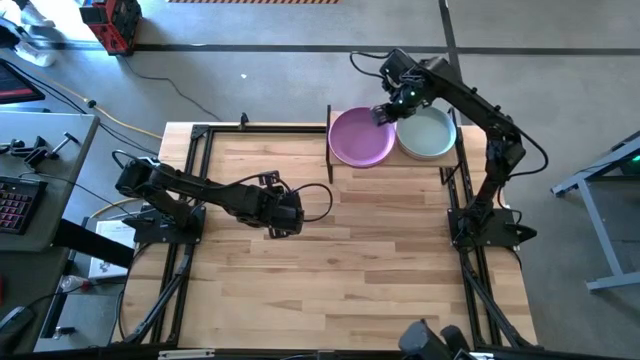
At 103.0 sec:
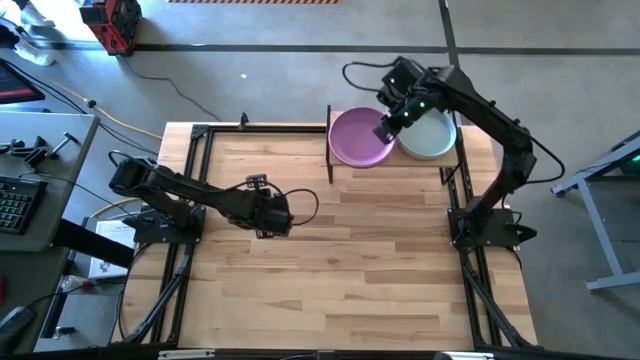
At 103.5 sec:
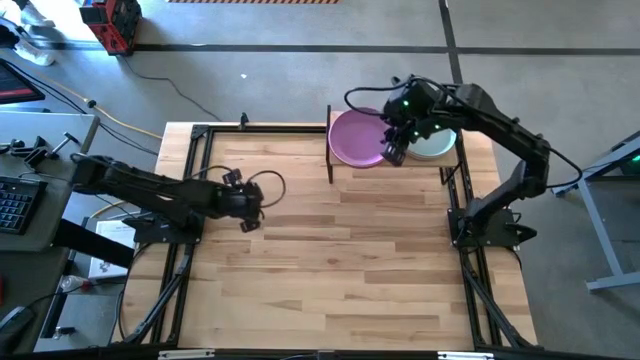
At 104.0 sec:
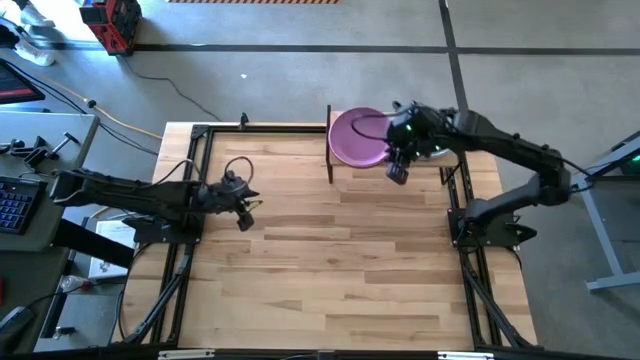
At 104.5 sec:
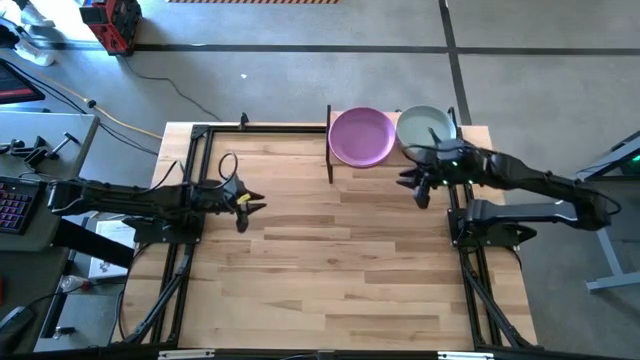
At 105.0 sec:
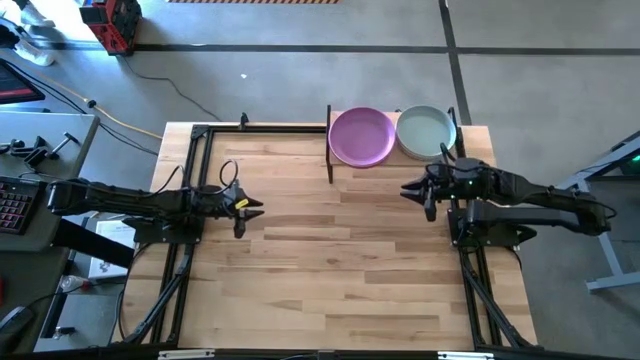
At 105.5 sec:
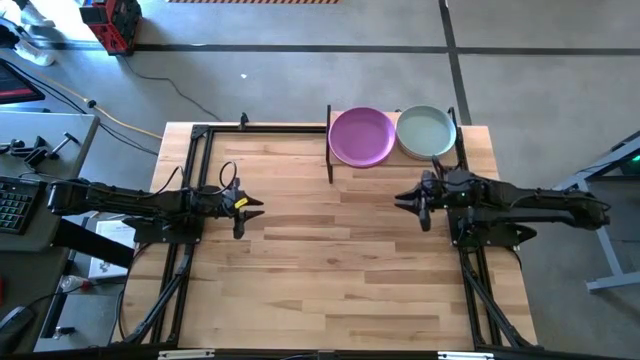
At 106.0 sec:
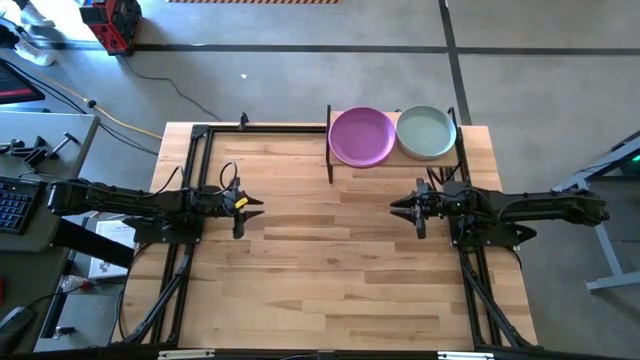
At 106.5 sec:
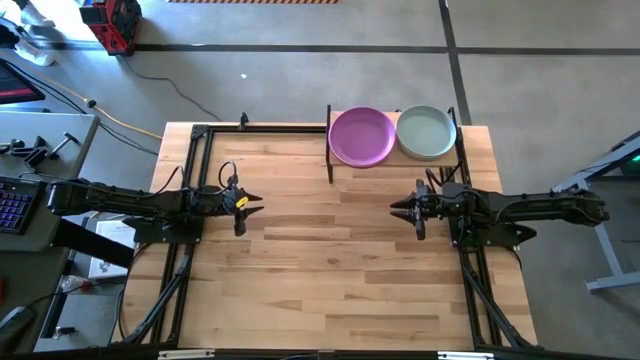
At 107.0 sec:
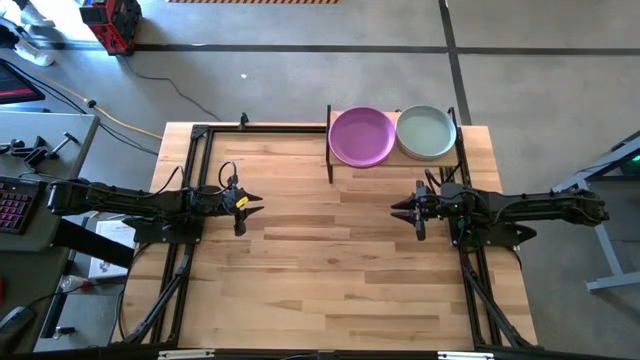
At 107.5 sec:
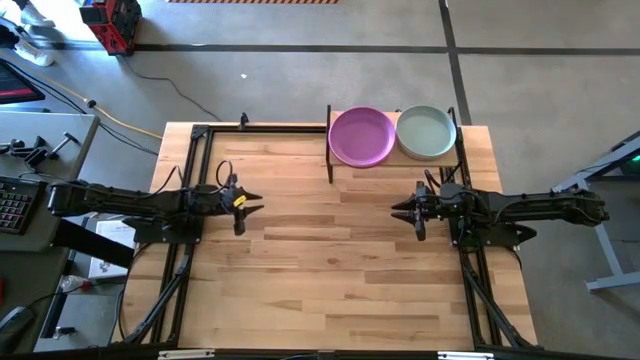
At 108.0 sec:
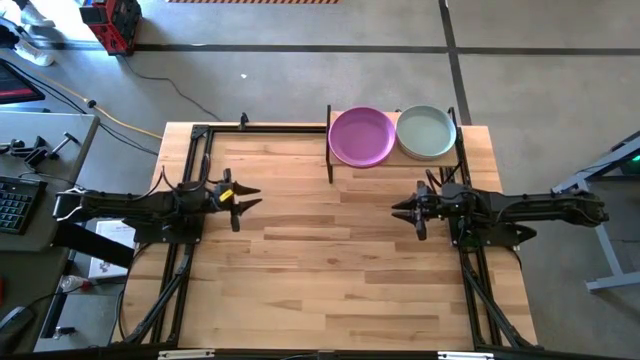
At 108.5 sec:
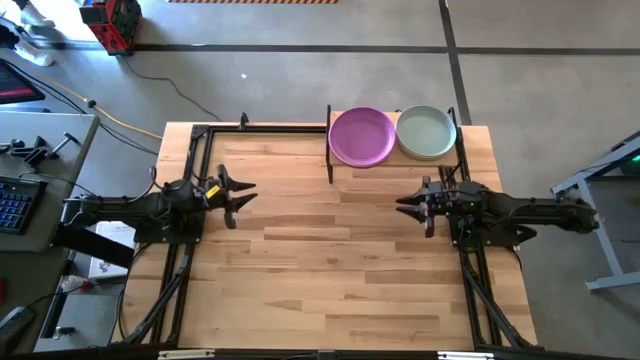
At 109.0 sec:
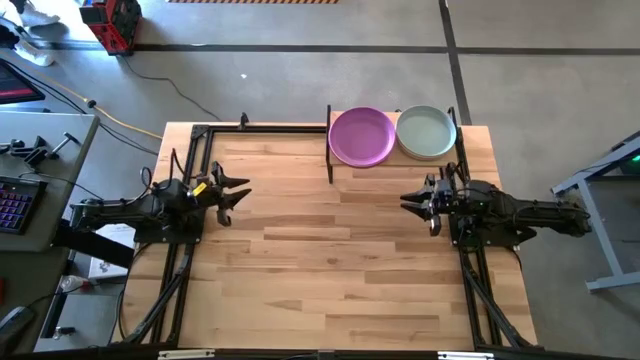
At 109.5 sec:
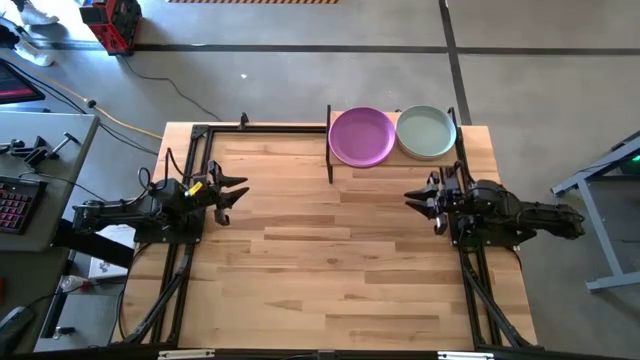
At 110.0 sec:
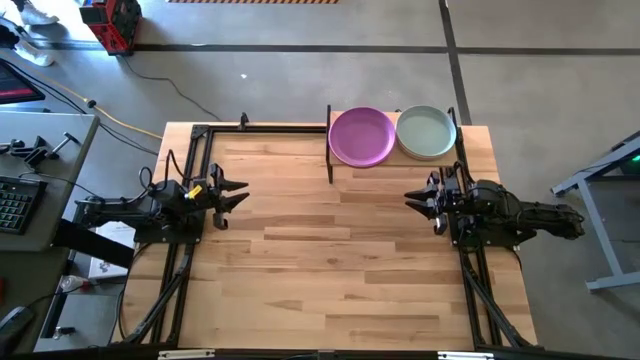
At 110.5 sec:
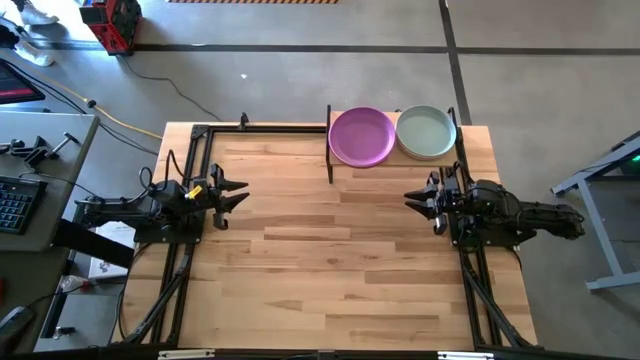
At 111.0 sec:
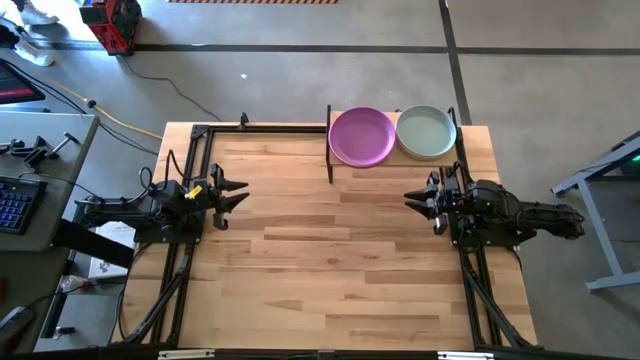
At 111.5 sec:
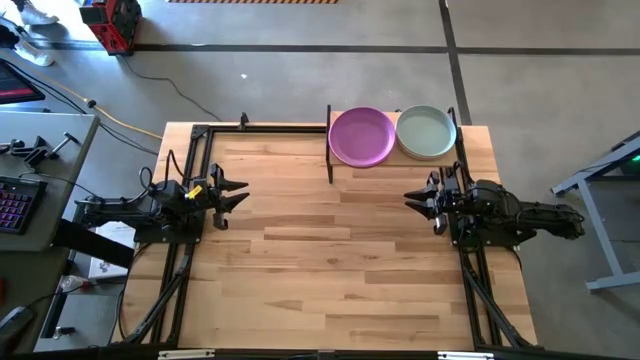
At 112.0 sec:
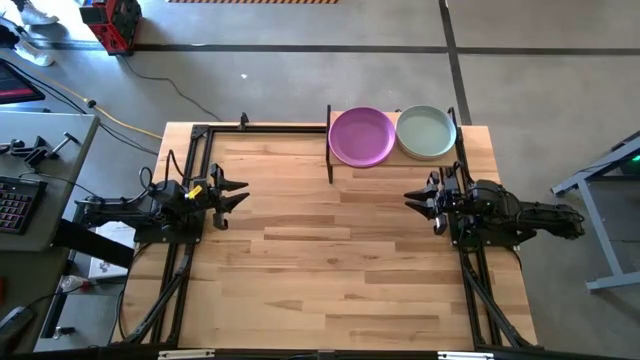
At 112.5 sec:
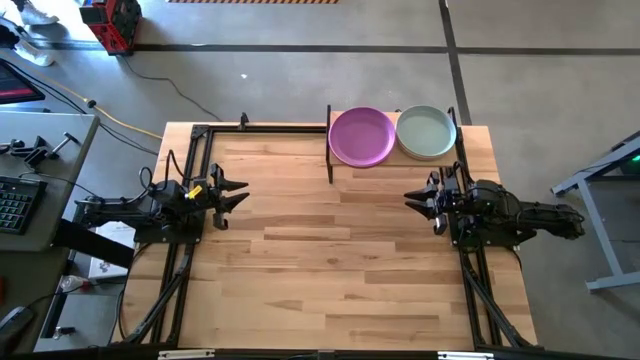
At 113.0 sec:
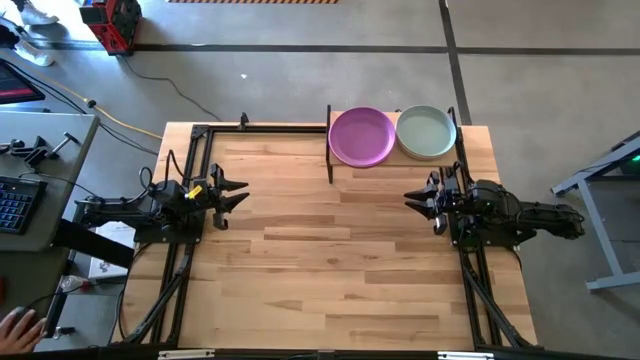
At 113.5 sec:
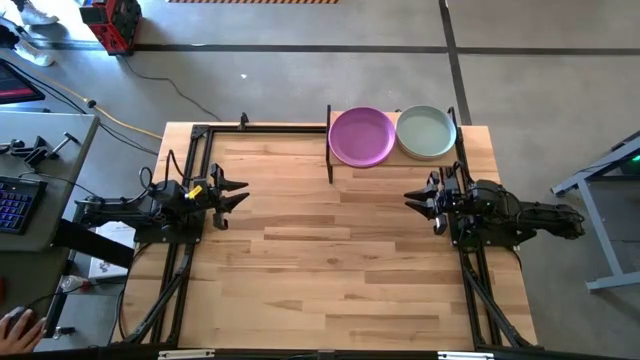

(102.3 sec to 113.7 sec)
Task: Place and stack plates onto a shelf
Return to Home Position

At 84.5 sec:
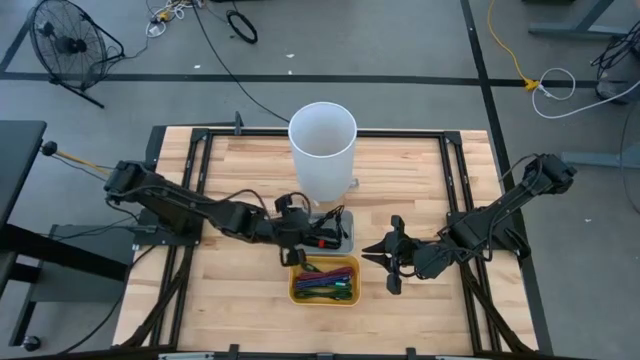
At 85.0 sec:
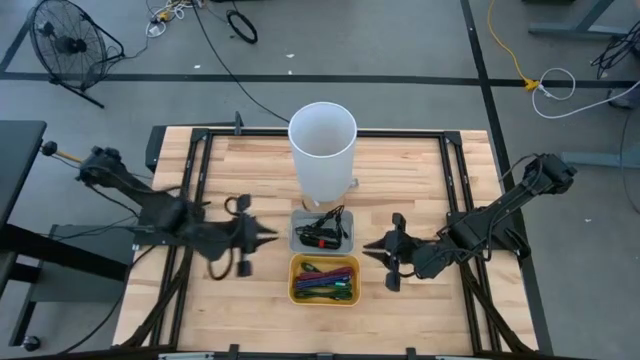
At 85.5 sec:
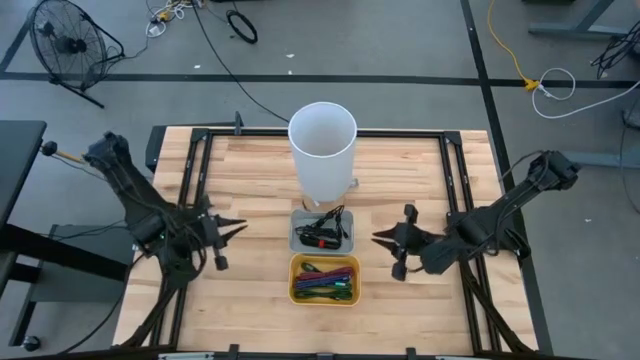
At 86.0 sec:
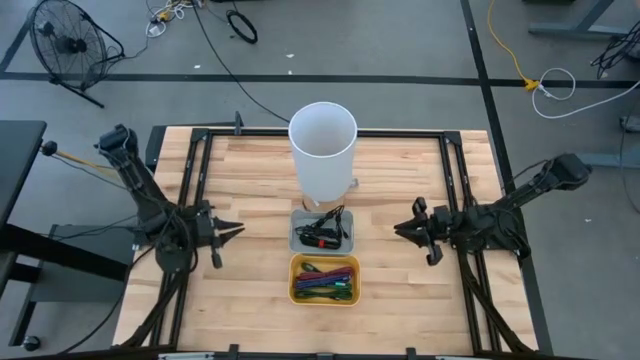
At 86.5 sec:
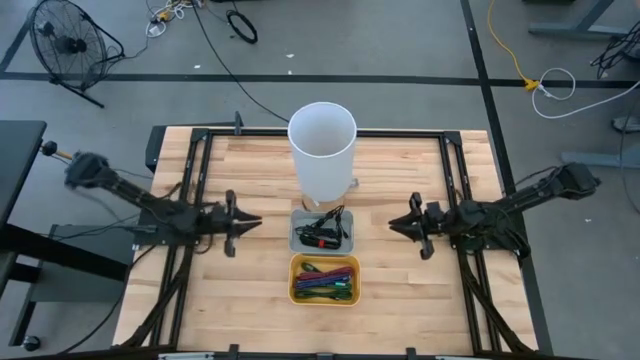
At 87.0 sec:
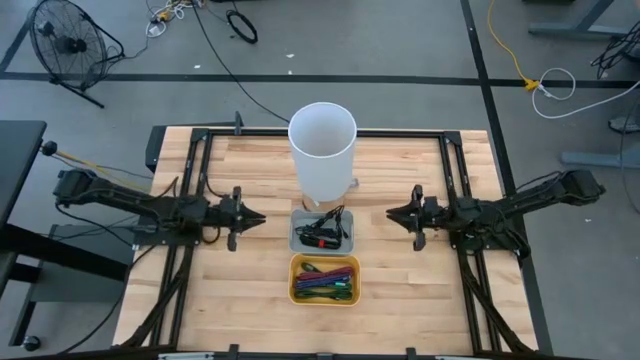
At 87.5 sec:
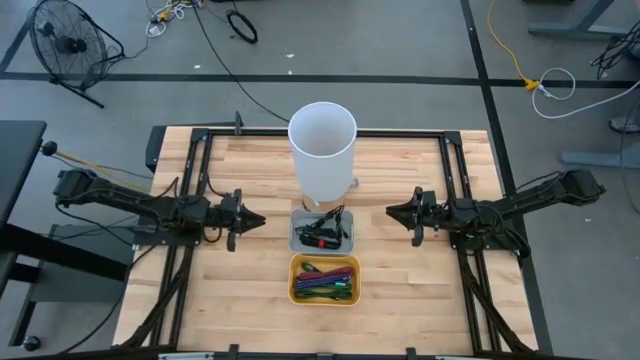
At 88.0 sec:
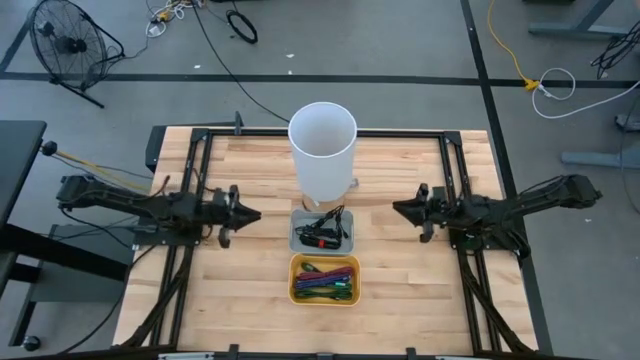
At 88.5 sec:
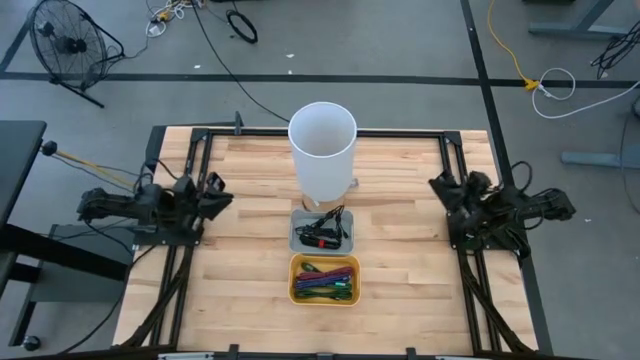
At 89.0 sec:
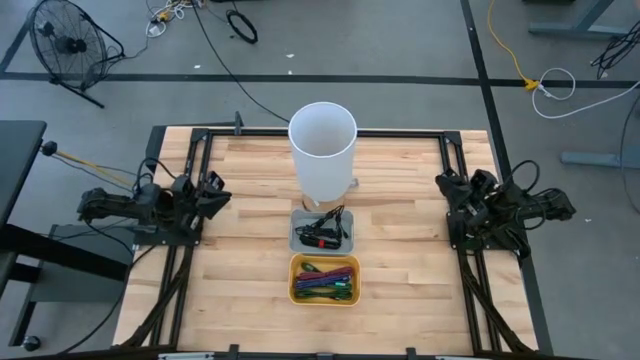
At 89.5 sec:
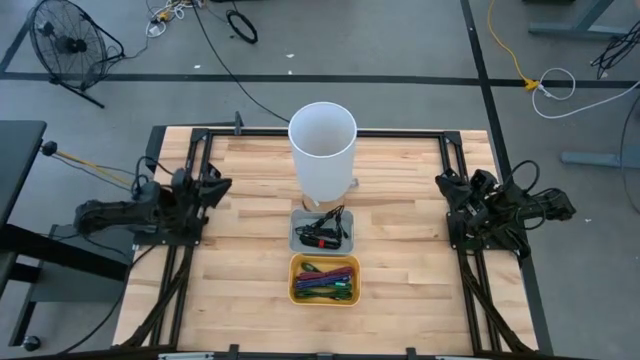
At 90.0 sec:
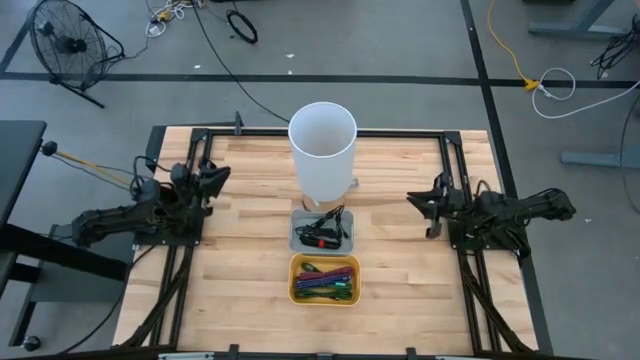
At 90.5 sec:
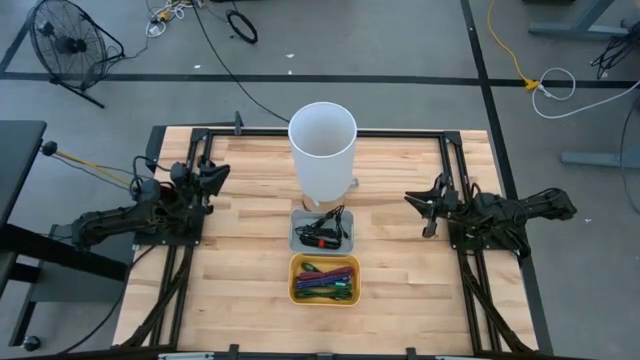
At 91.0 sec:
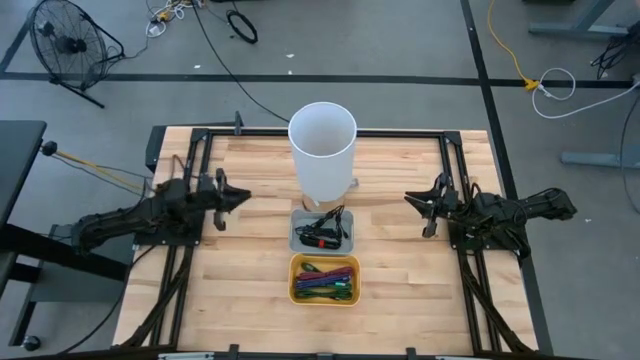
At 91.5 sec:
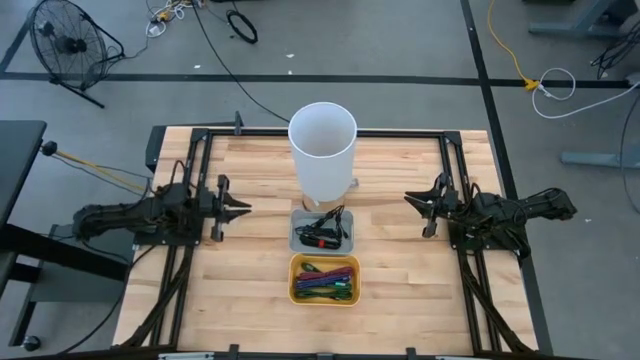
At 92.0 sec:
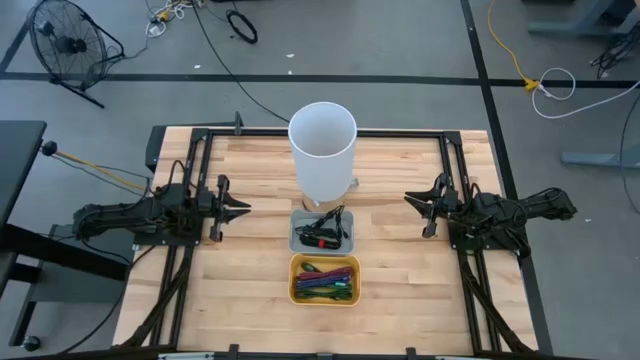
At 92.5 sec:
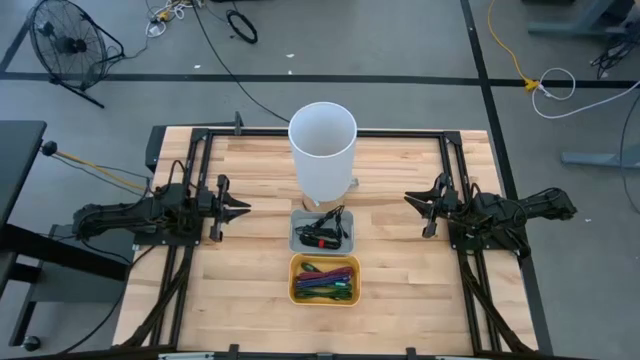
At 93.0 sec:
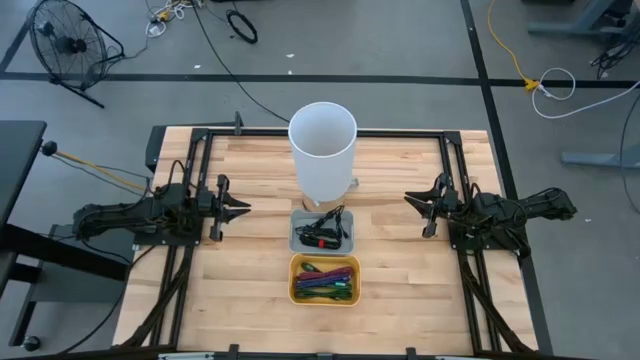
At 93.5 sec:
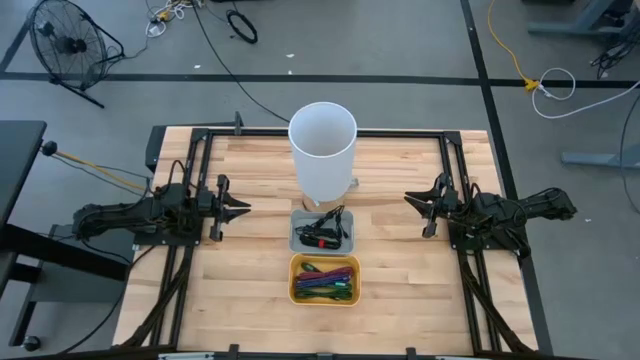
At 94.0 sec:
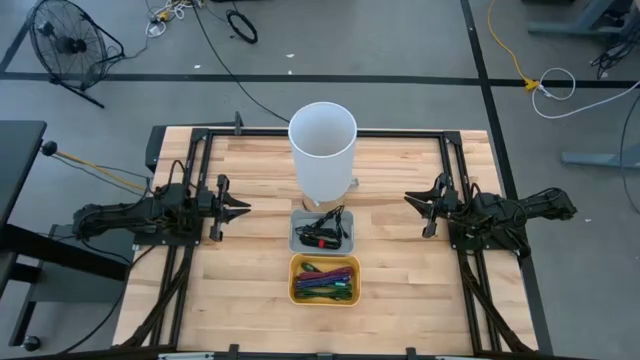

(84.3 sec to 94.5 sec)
Task: Pick & Place USB Port
Return to Home Position
